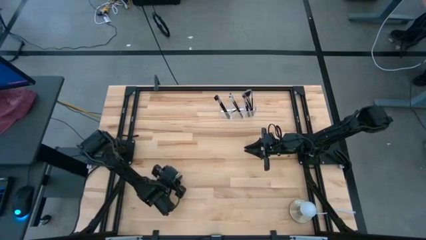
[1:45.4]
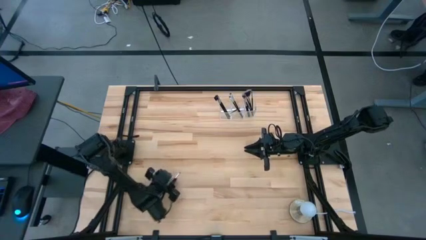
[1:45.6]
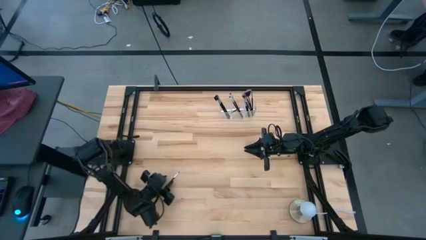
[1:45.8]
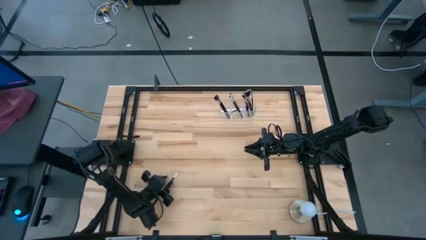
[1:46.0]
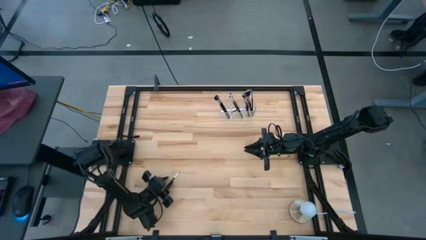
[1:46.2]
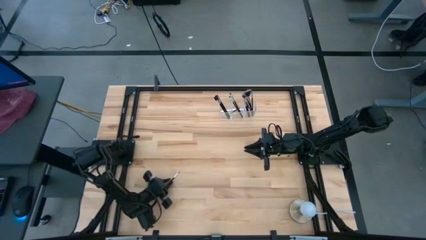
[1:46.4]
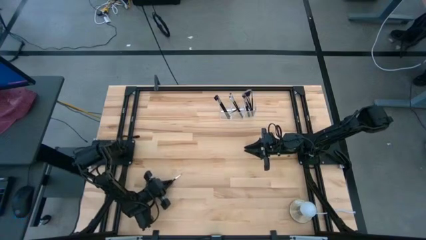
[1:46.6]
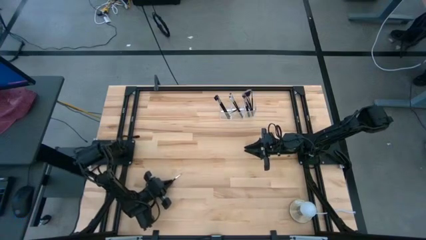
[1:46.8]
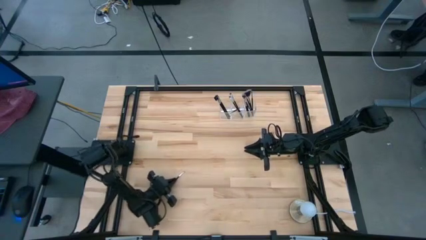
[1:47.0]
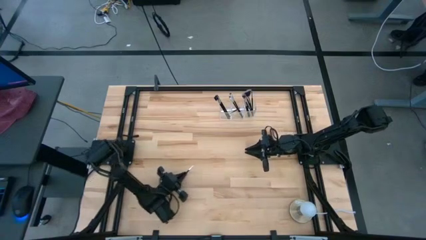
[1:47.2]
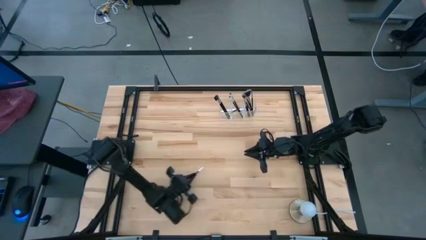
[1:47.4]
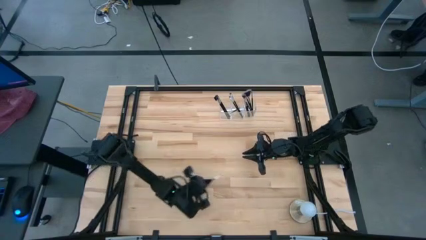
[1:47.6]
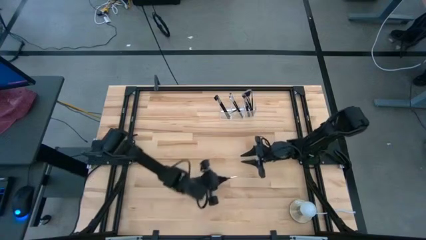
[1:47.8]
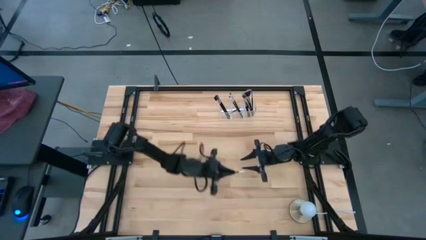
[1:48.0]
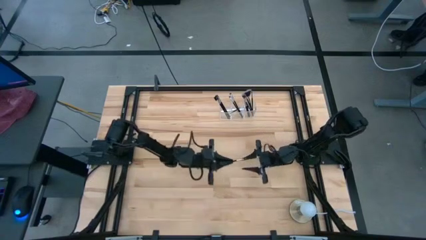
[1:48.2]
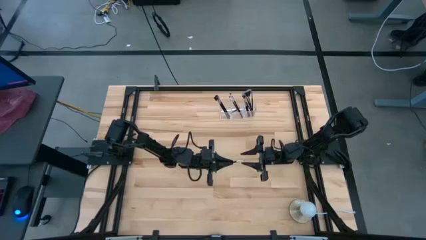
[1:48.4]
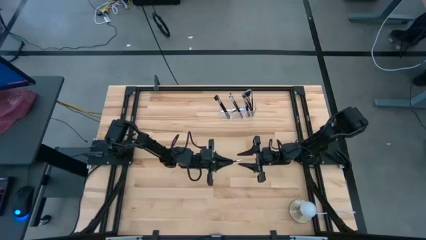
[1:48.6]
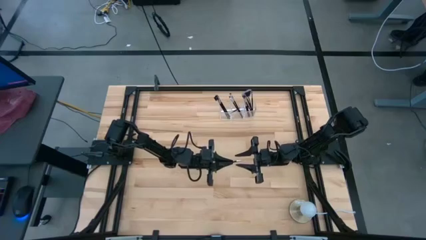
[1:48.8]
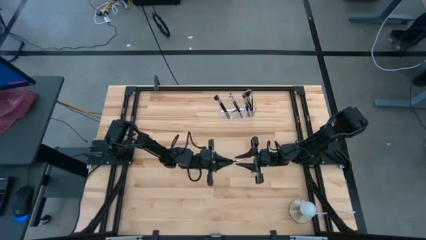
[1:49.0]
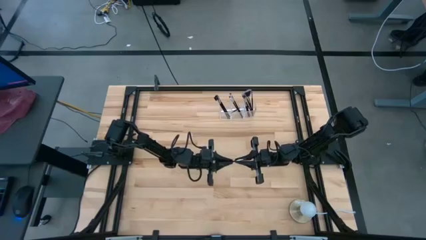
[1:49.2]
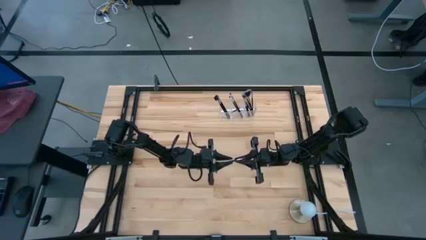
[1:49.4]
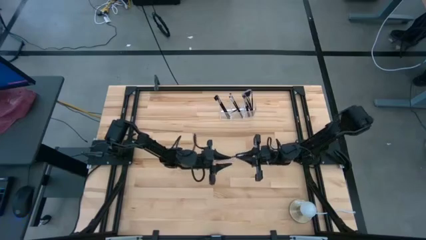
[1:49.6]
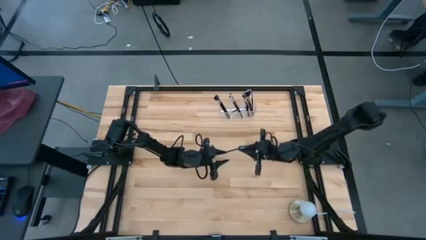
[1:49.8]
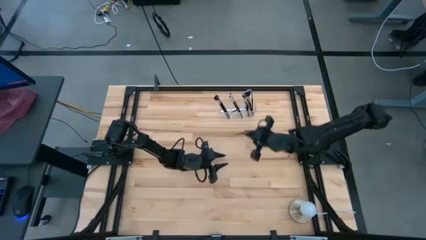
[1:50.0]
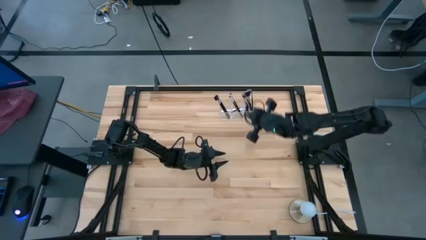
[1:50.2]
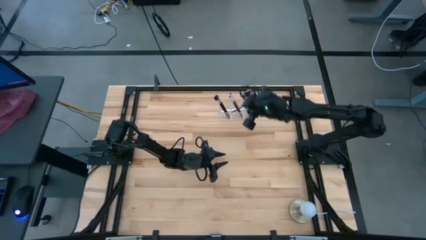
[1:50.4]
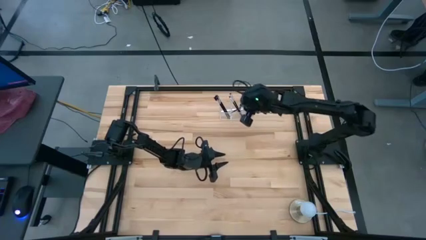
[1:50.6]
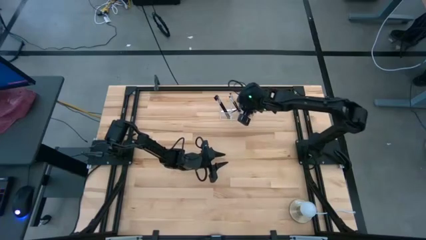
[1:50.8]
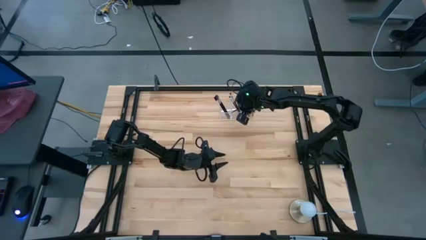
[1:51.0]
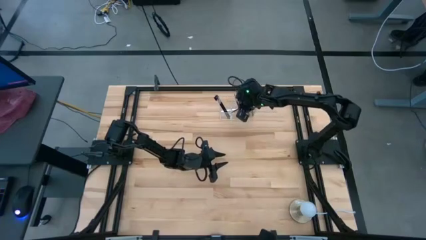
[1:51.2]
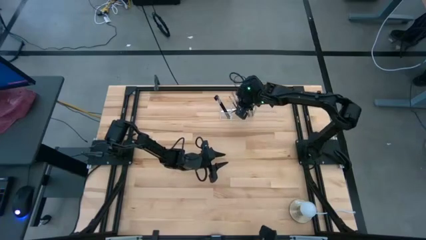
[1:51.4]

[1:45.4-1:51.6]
Task: Put items in baskets/containers
Put the black eyeshadow brush into the transparent organizer

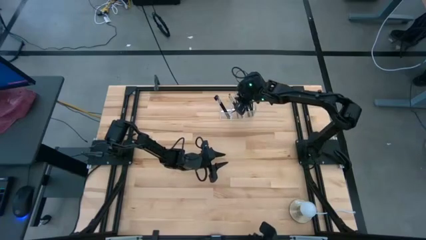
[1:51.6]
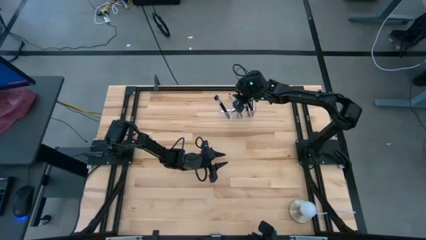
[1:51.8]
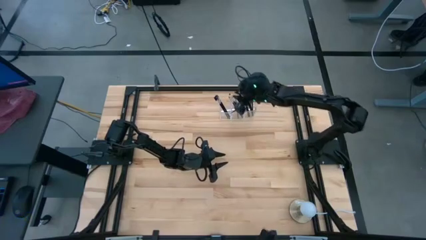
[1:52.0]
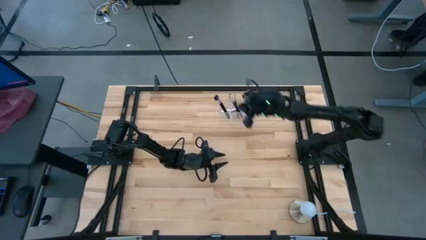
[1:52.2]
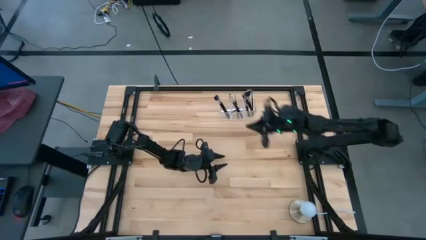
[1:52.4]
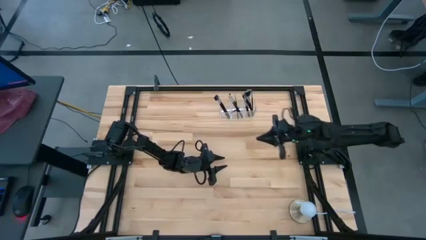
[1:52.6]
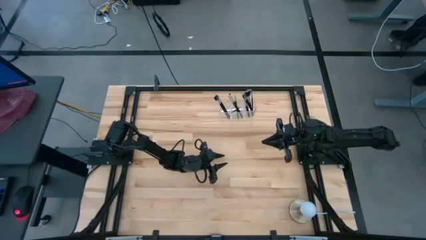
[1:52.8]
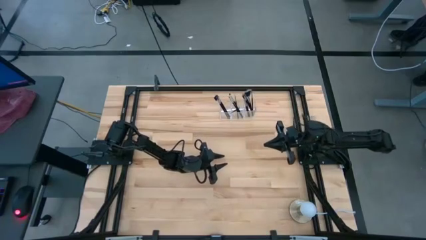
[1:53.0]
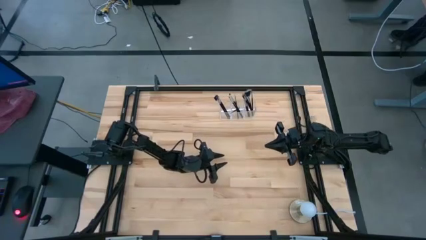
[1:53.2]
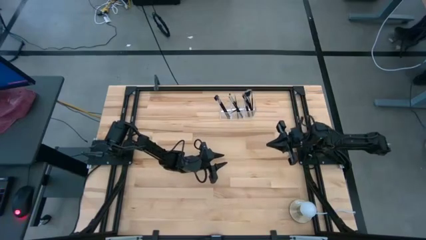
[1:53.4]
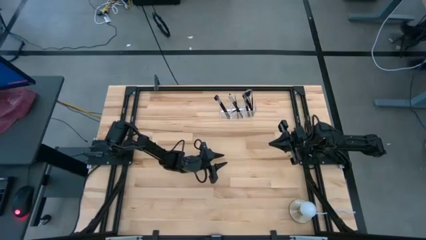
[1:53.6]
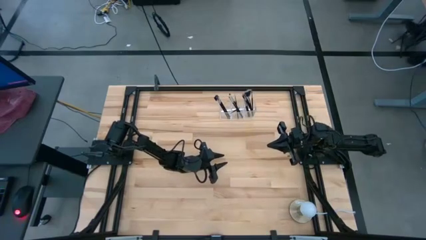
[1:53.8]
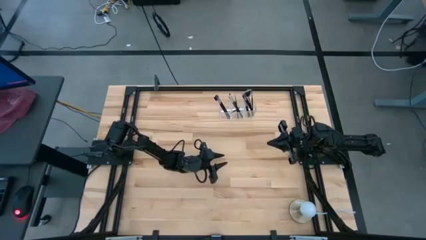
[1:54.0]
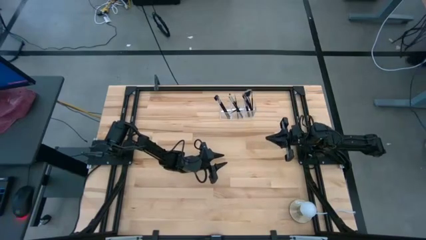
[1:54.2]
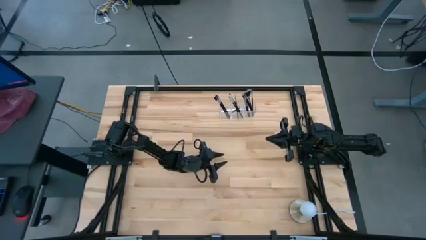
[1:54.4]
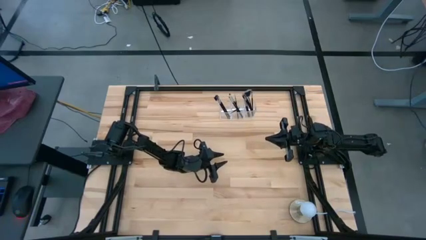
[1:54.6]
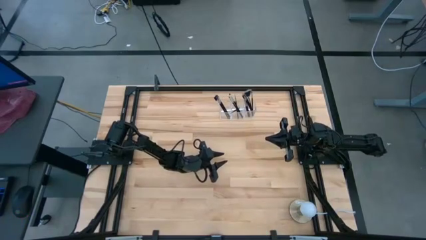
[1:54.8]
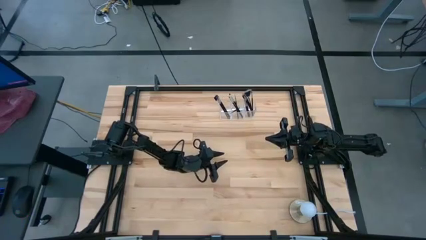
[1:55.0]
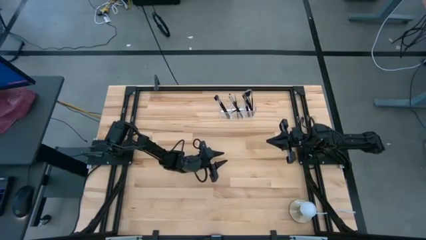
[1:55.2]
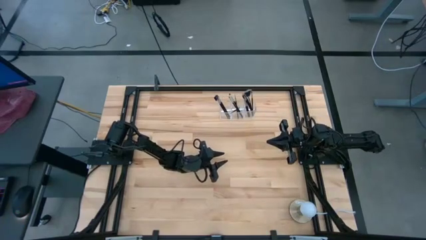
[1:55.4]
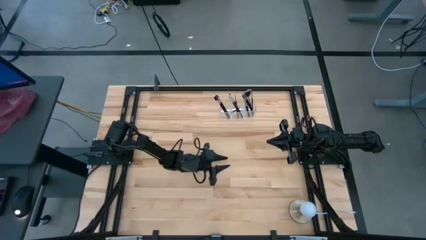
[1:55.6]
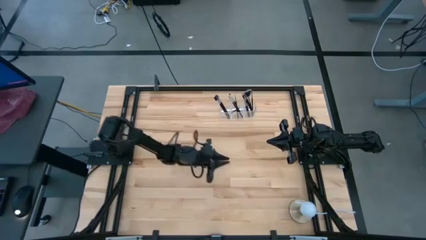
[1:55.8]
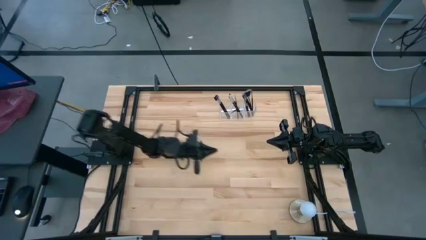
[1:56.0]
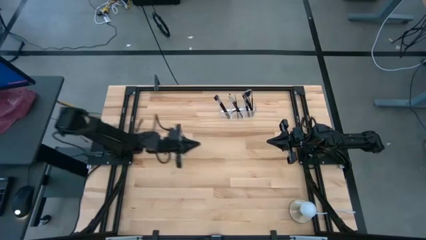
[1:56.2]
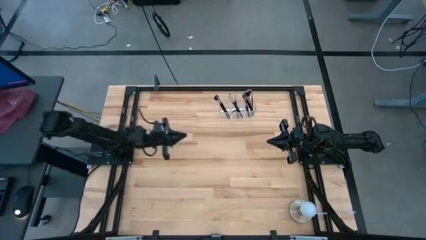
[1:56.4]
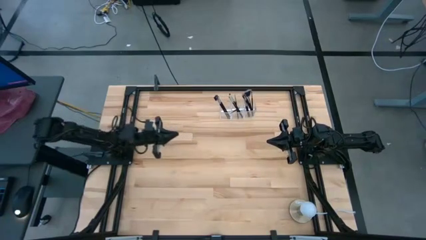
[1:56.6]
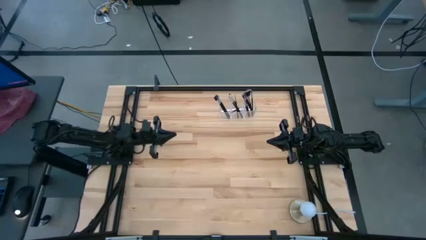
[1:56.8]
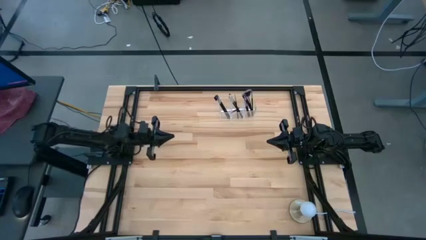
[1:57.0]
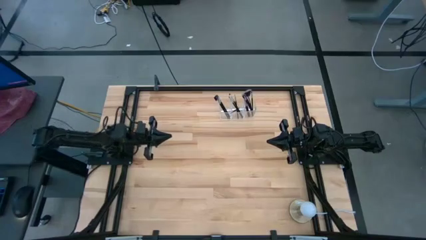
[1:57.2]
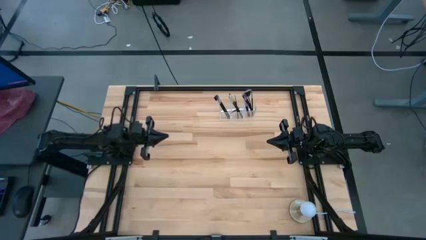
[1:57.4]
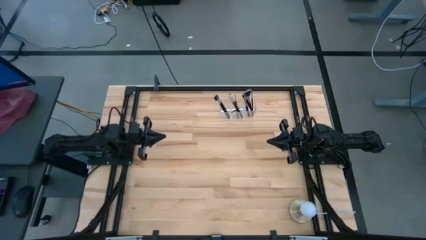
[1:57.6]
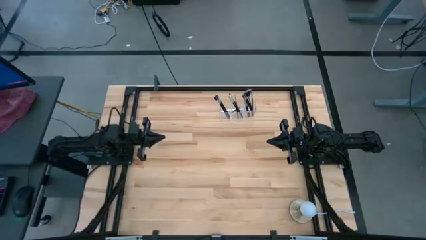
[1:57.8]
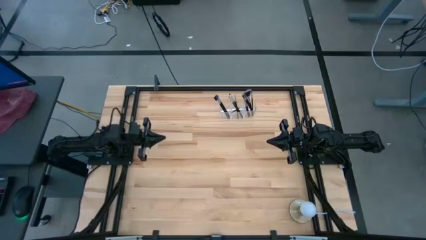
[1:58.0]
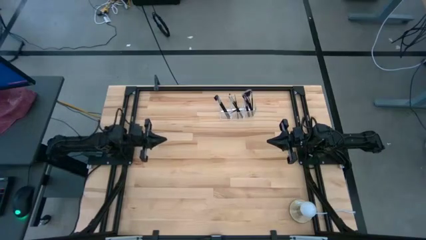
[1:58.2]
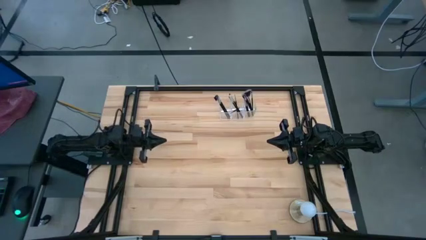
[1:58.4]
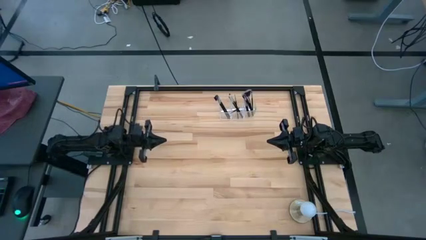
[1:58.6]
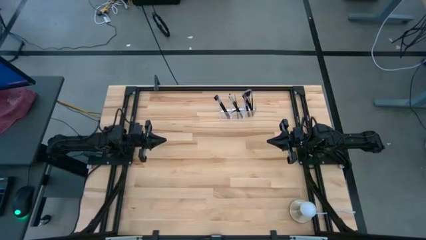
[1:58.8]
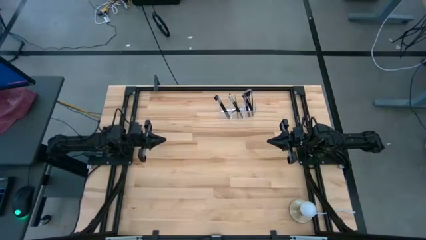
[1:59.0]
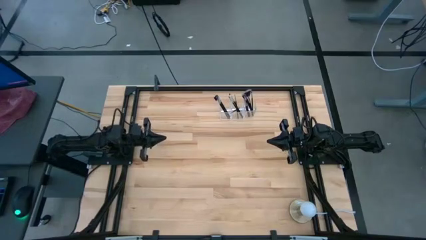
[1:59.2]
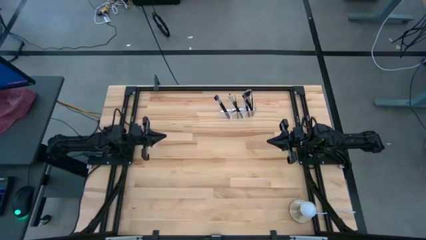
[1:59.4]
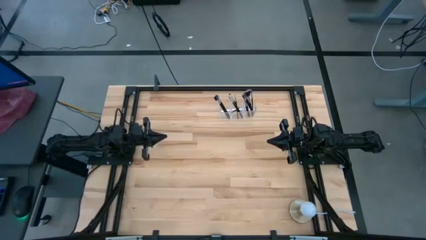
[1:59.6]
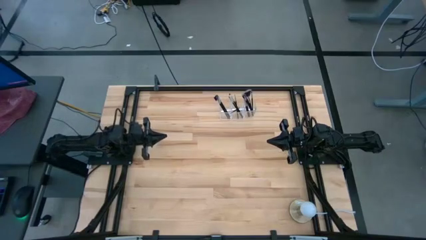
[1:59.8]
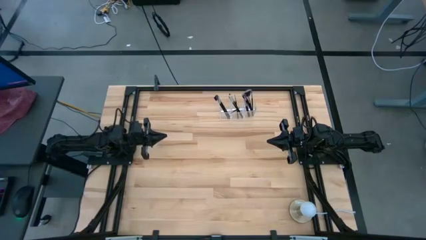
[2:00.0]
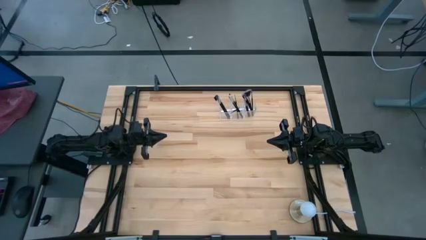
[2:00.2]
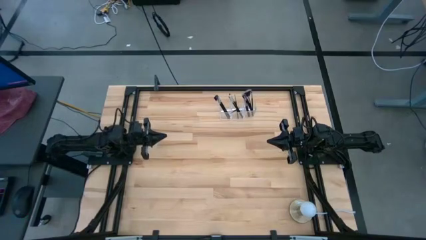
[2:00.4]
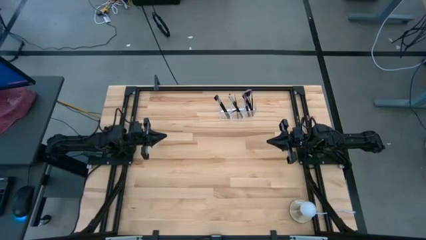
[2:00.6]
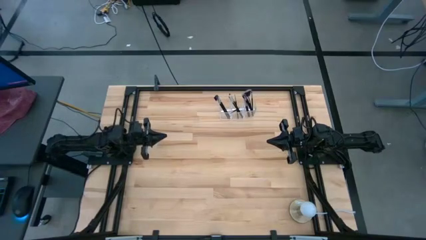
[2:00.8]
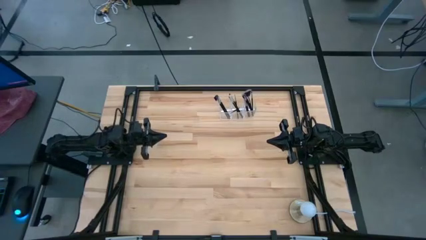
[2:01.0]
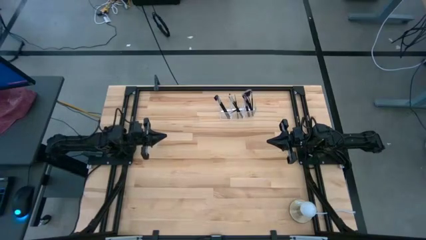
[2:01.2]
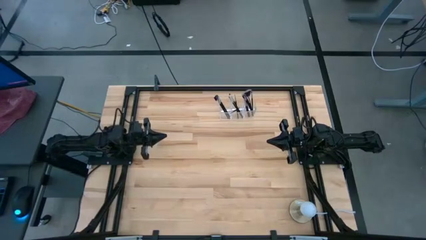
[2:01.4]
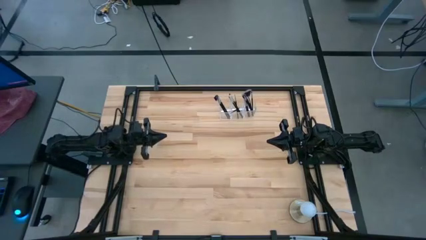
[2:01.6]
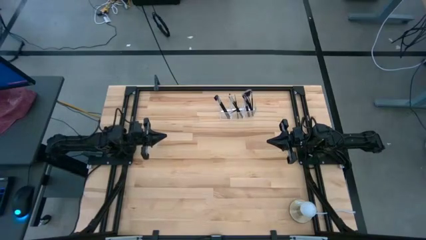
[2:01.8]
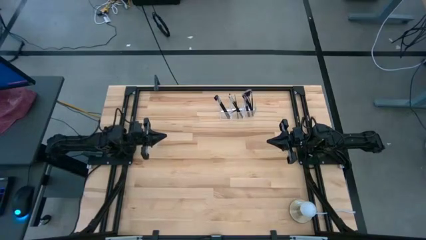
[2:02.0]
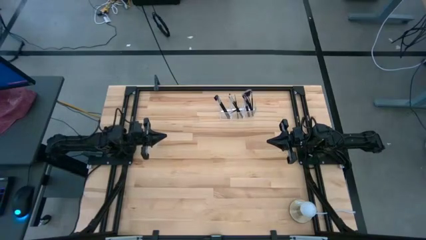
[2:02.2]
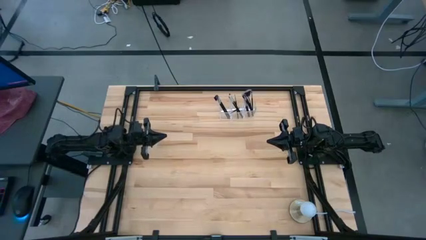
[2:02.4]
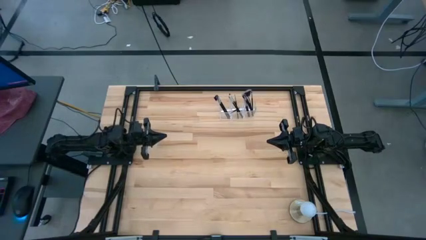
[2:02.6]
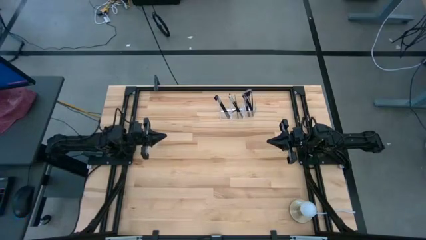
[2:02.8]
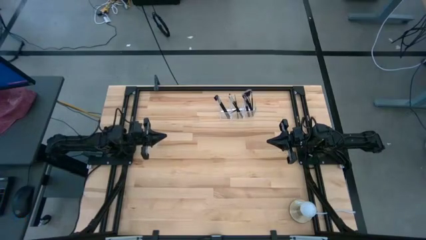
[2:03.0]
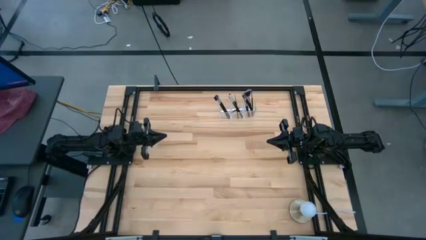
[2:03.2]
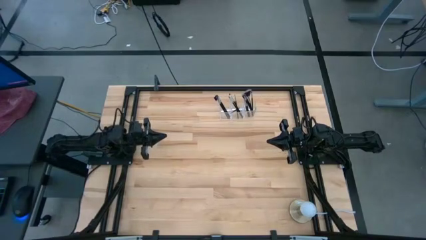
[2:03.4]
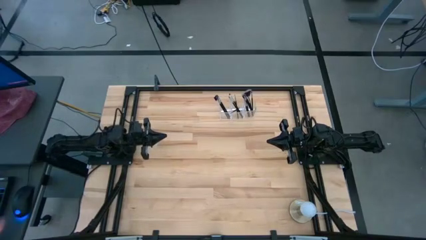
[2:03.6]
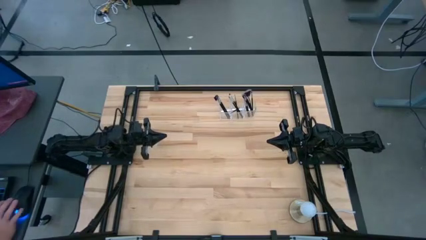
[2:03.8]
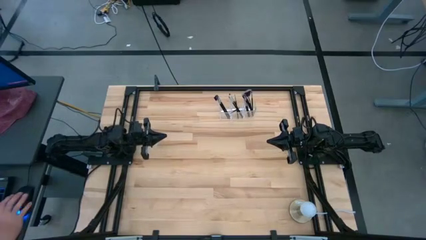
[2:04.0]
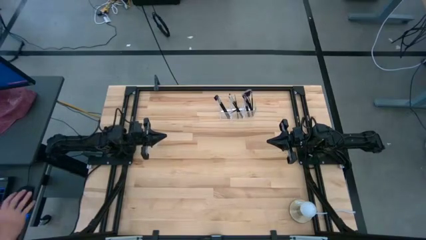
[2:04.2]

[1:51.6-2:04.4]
Return to Home Position
